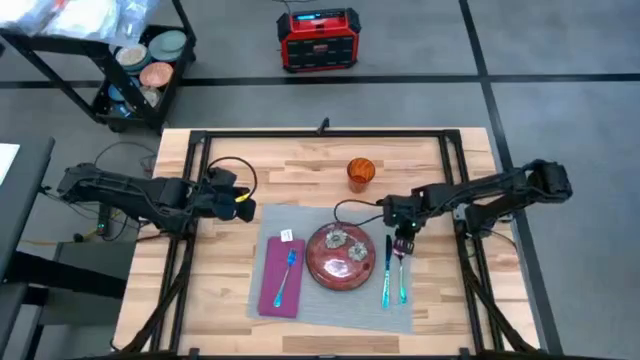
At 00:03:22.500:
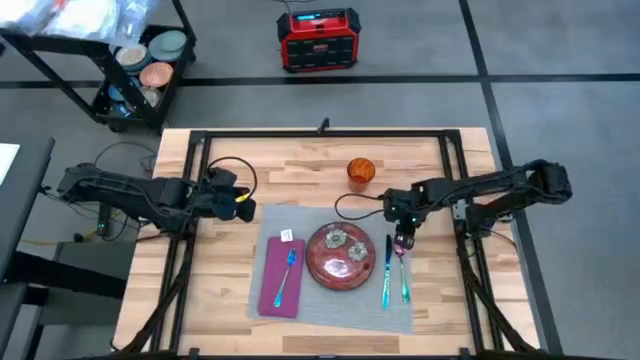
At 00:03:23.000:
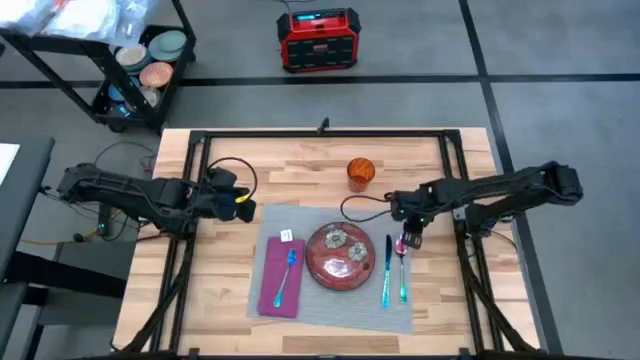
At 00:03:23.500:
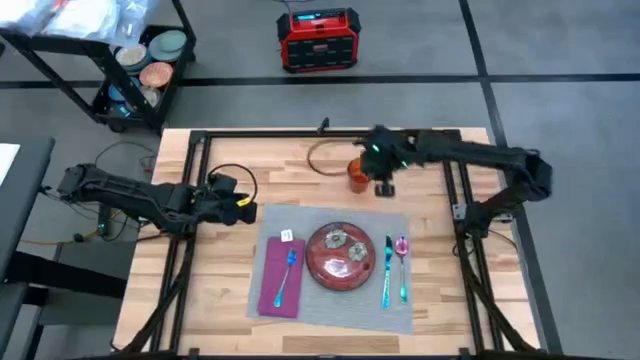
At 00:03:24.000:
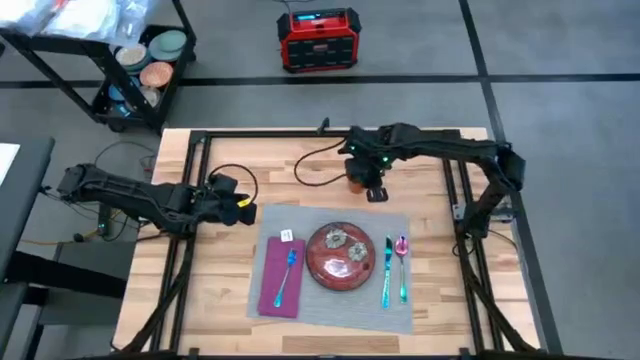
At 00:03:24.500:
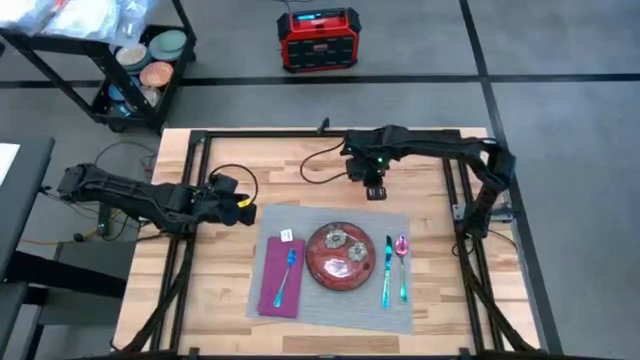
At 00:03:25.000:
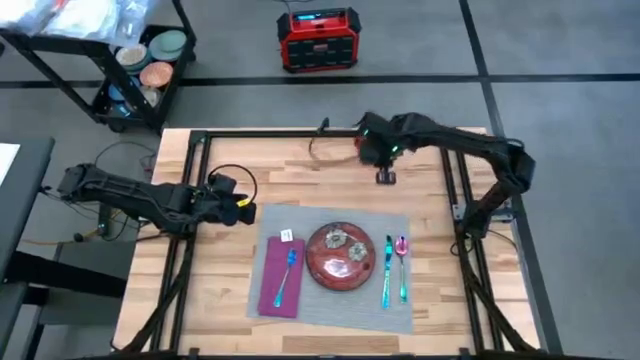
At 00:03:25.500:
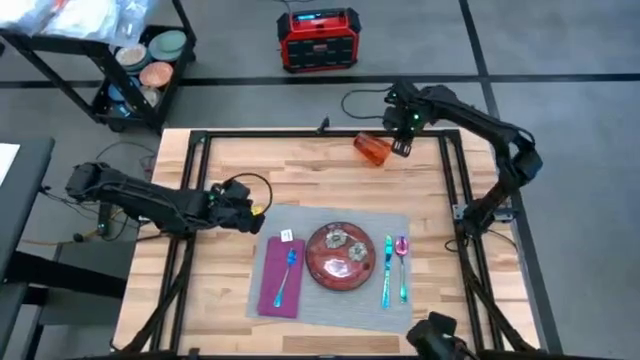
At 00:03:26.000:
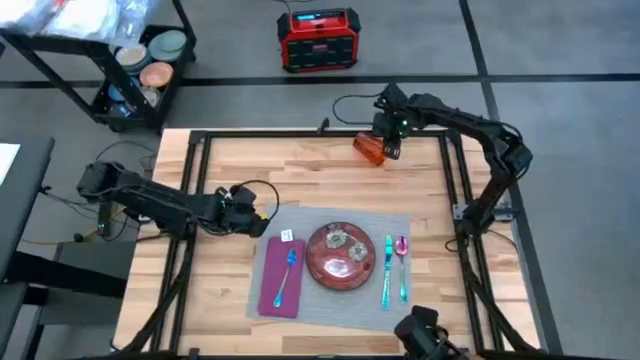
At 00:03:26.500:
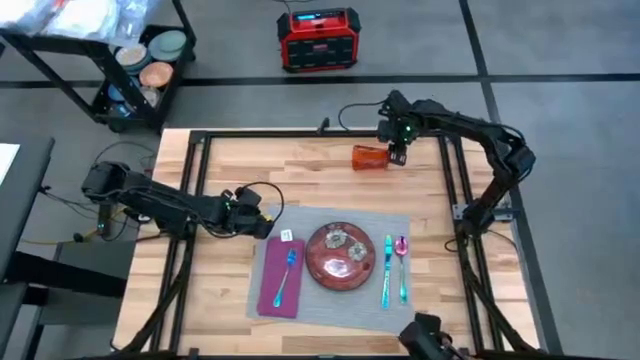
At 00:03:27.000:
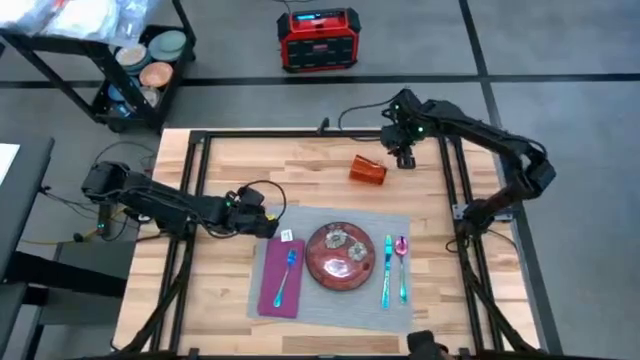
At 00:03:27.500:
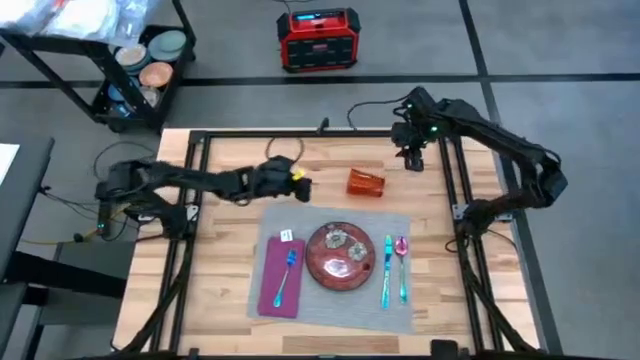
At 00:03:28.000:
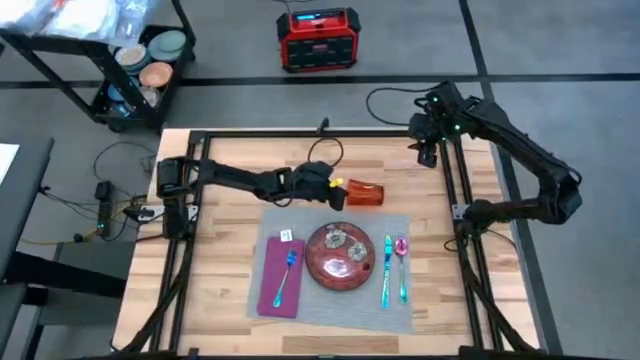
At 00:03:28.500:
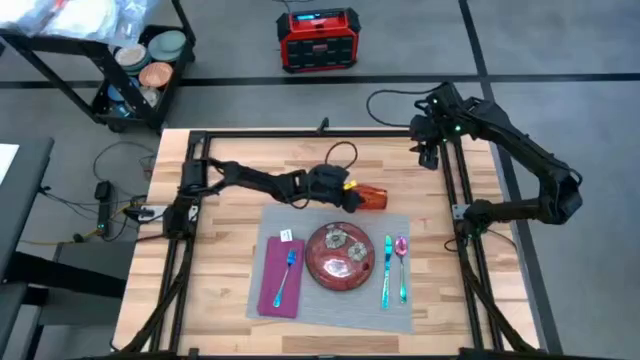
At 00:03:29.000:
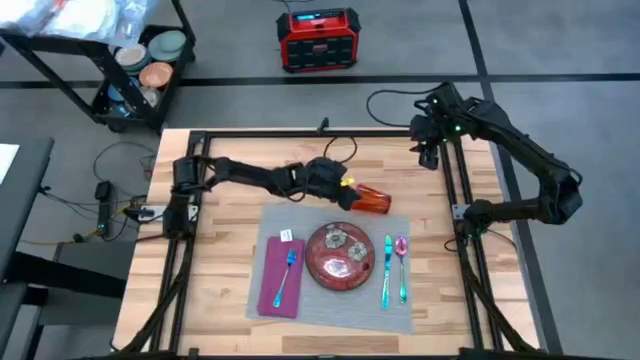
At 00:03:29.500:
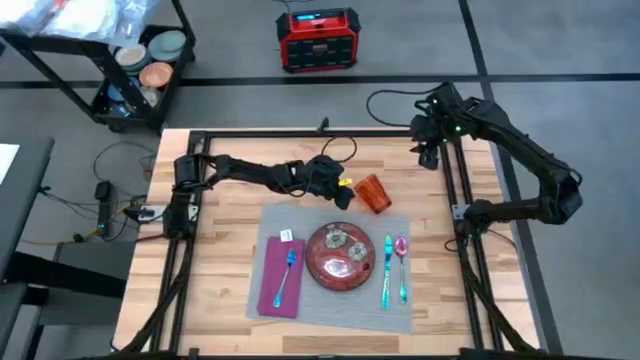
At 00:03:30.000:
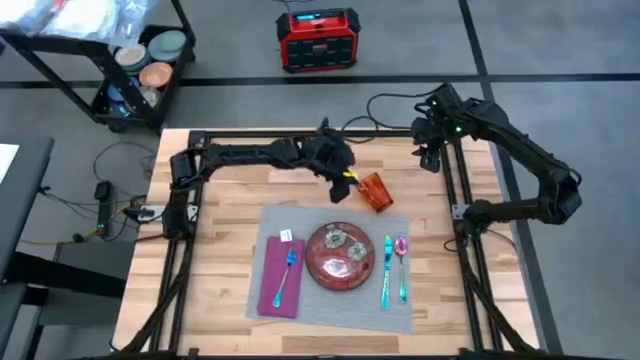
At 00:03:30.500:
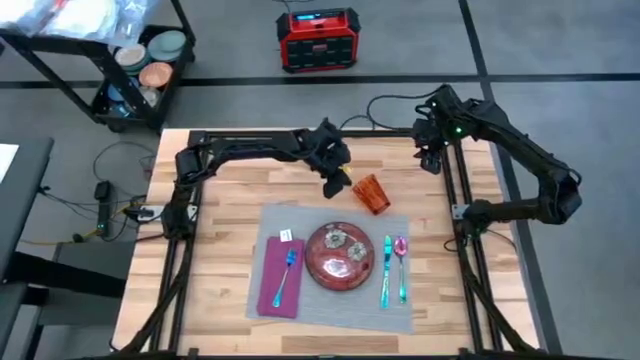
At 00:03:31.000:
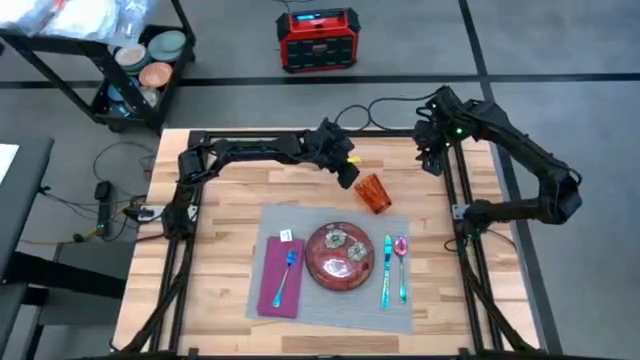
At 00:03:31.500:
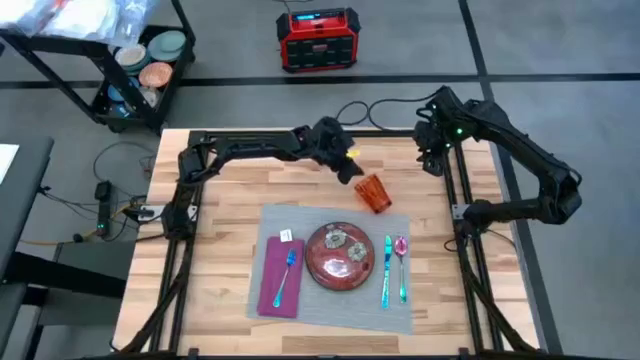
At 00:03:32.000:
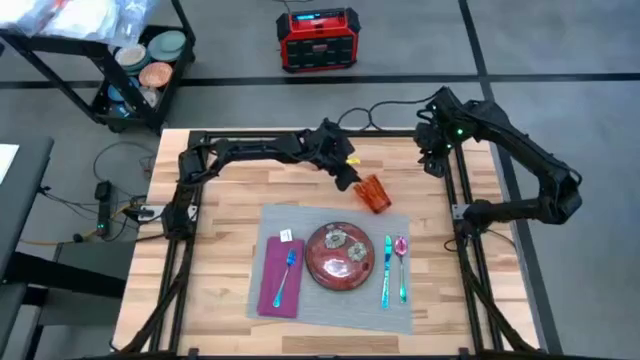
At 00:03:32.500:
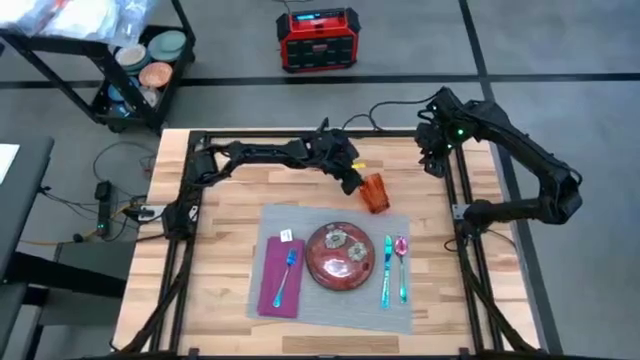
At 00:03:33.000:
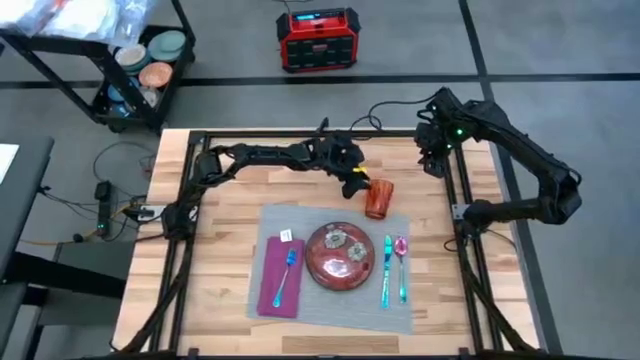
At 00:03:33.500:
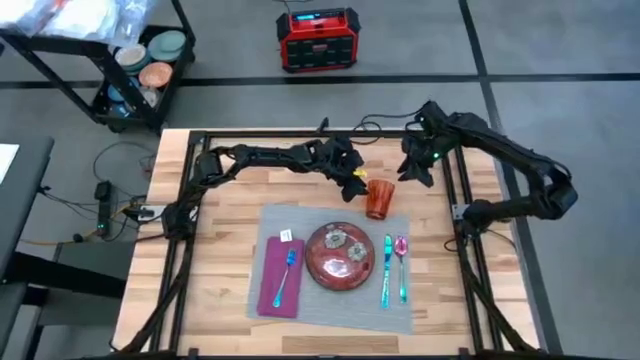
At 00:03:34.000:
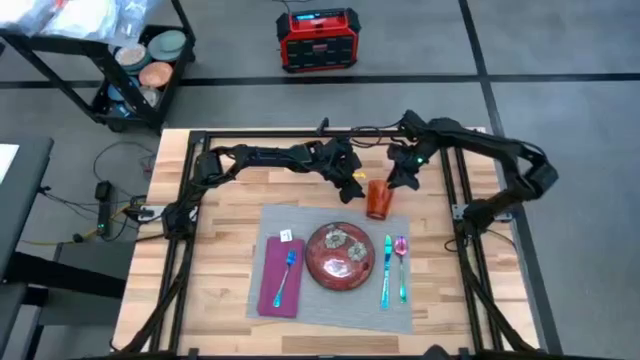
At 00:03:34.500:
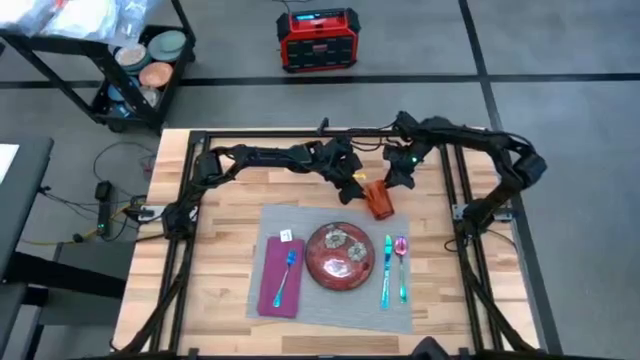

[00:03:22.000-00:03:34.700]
Task: Set table place
Adjust the red cup

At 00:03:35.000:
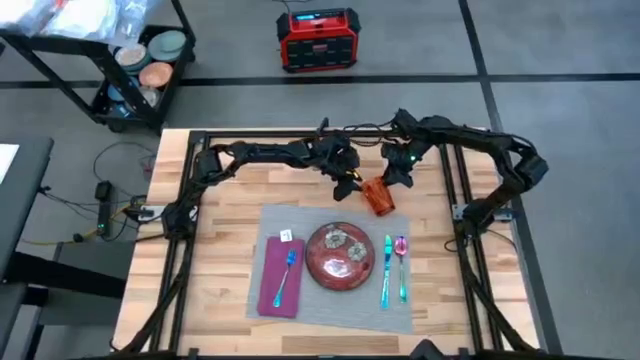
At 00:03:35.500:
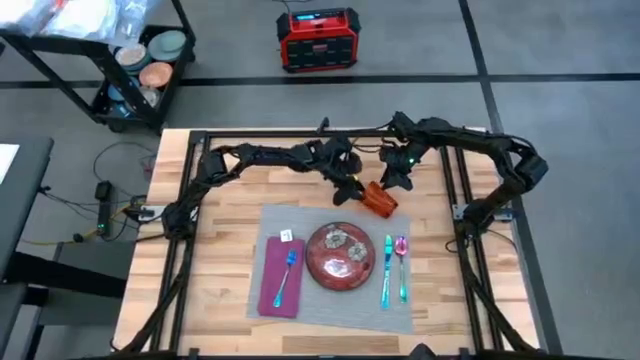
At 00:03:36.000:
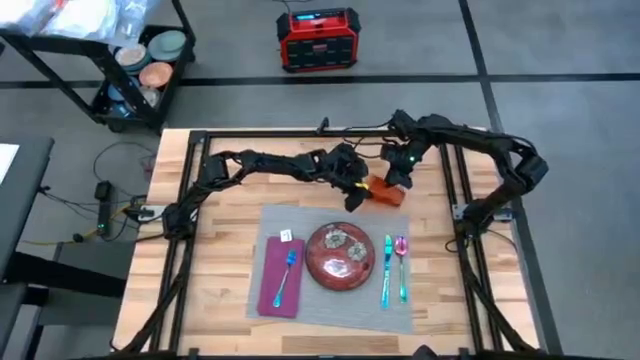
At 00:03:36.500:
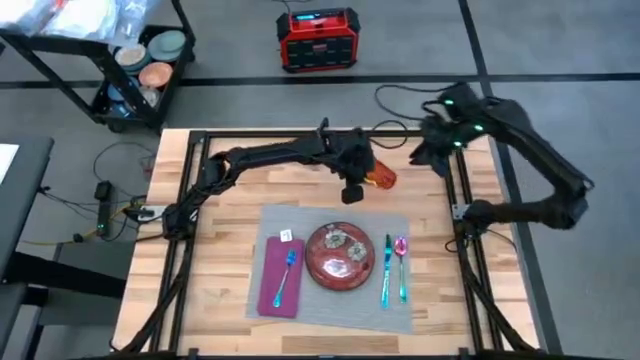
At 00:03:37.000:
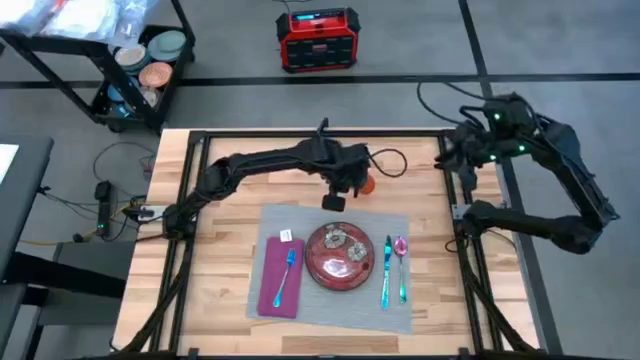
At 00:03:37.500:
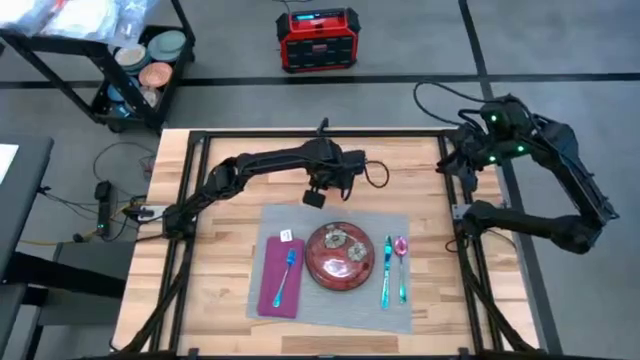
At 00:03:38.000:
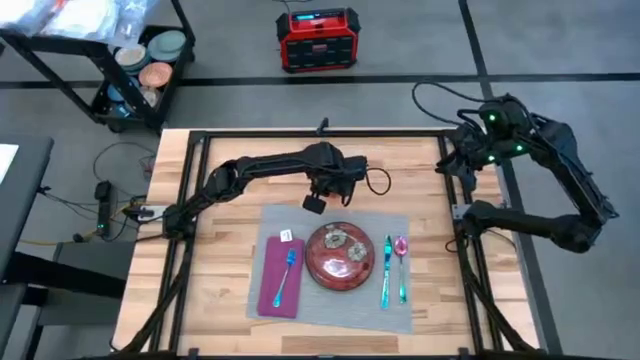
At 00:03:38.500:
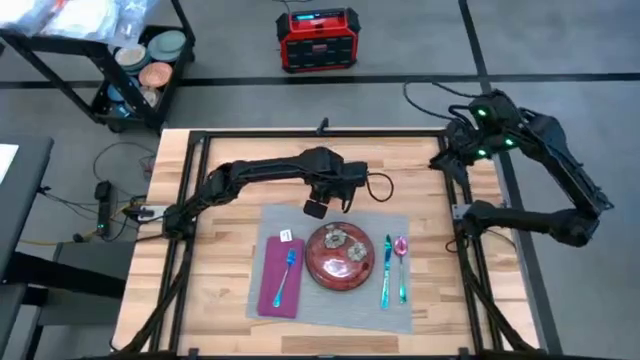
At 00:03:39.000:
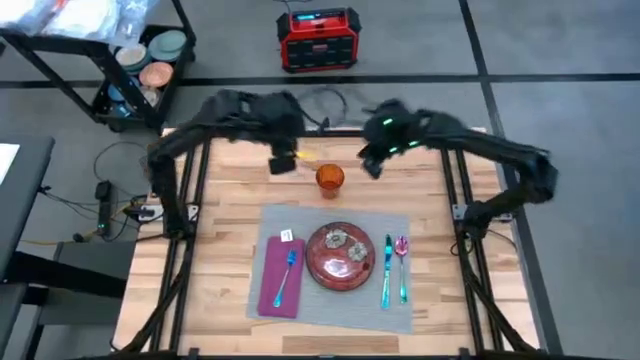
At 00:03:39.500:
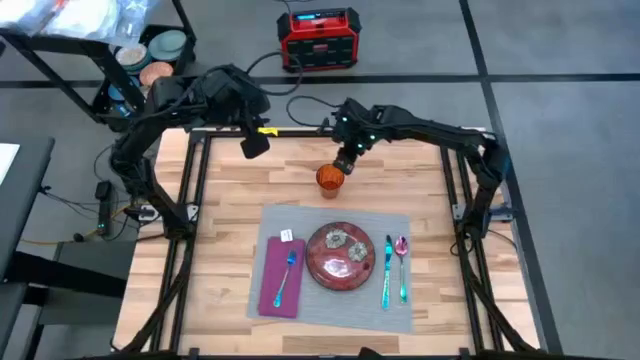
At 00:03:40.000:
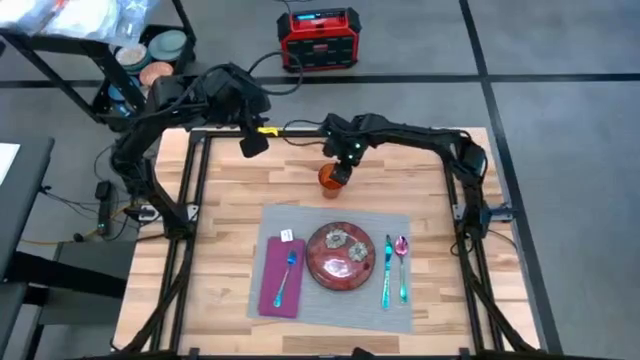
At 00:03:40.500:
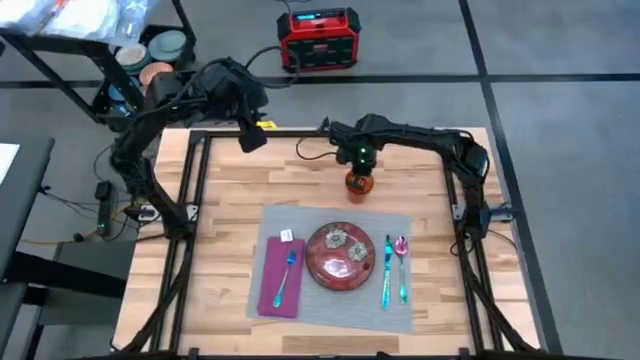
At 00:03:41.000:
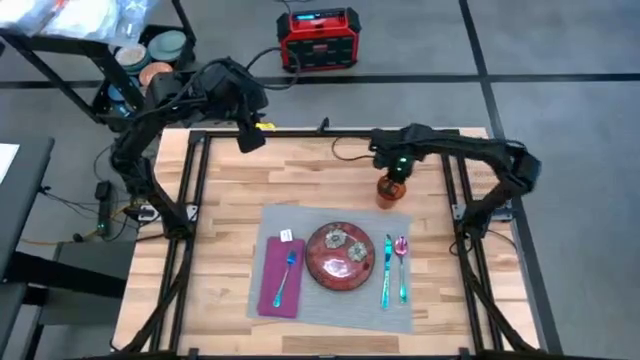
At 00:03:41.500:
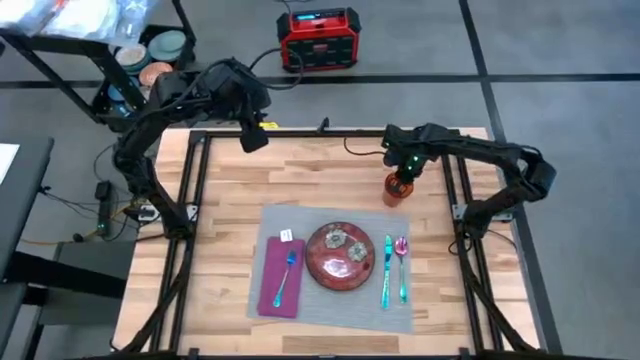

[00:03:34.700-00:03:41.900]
Adjust the red cup

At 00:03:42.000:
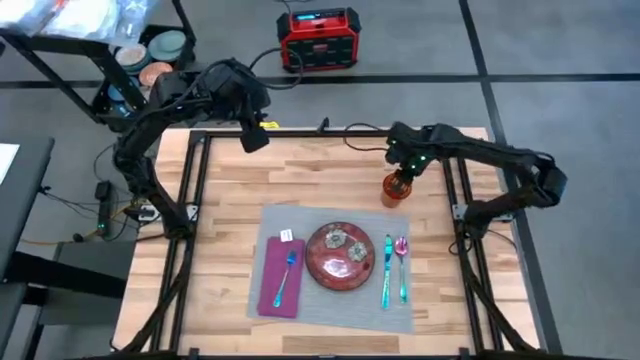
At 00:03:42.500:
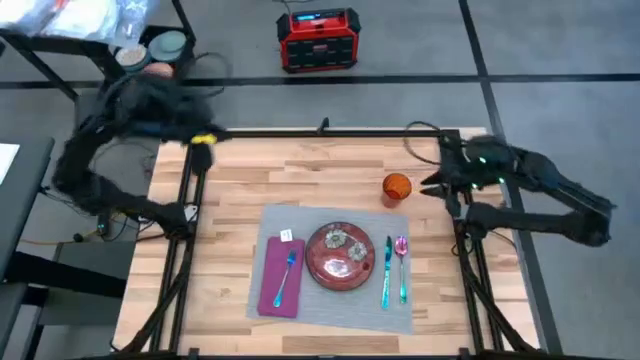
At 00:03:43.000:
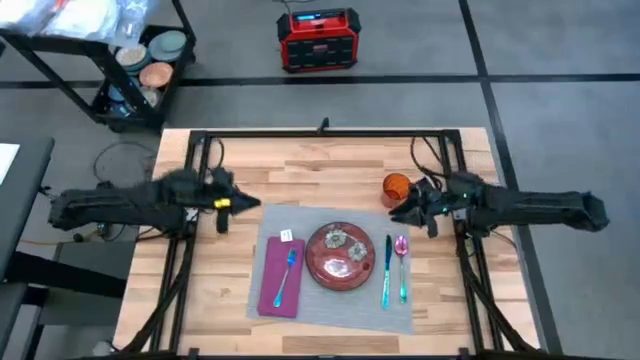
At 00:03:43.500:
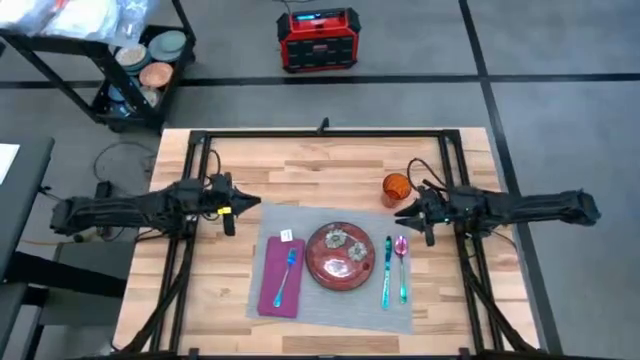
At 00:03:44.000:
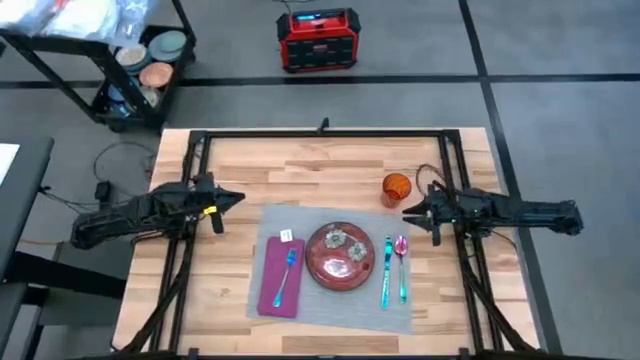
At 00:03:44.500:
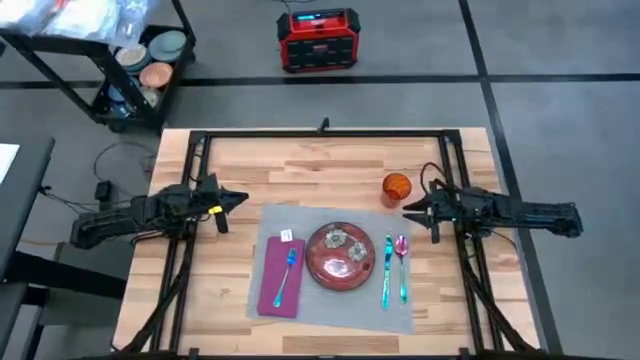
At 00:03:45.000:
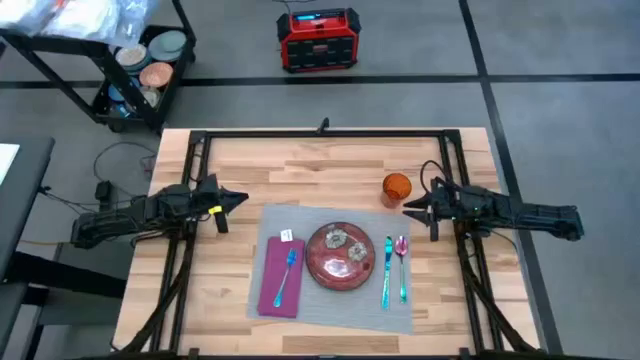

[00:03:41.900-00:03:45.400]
Return to Home Position
